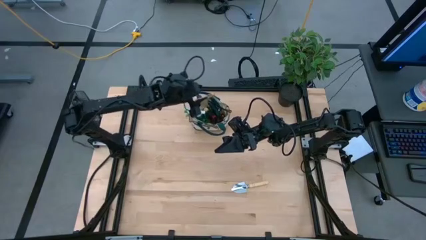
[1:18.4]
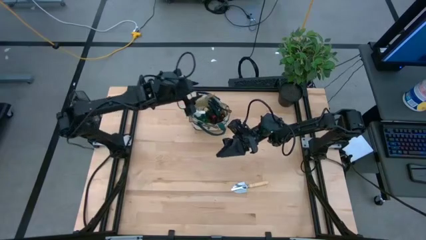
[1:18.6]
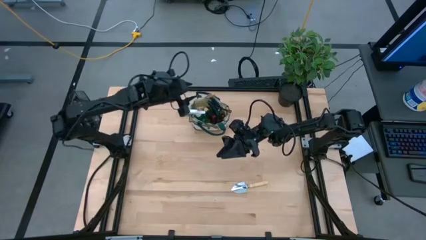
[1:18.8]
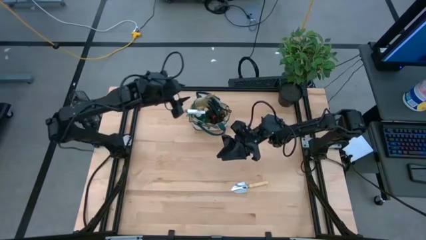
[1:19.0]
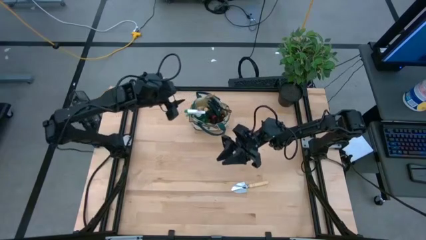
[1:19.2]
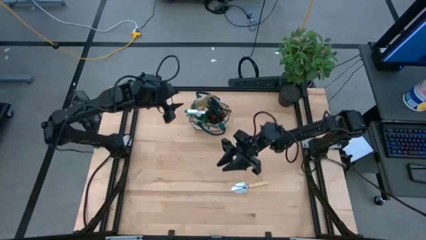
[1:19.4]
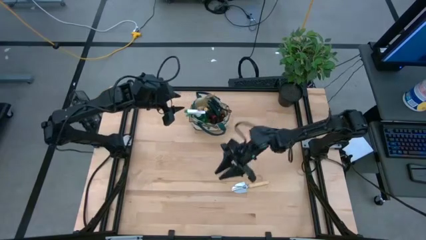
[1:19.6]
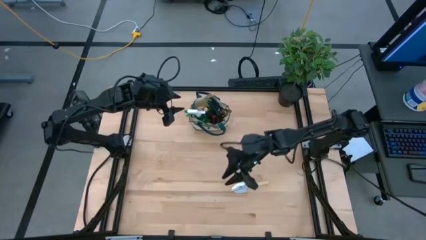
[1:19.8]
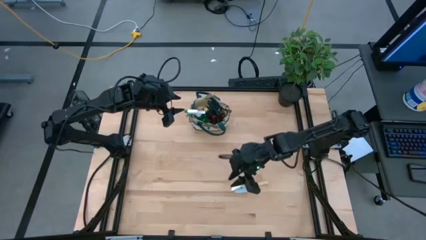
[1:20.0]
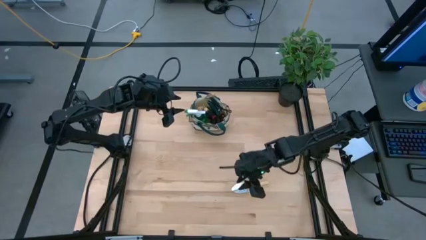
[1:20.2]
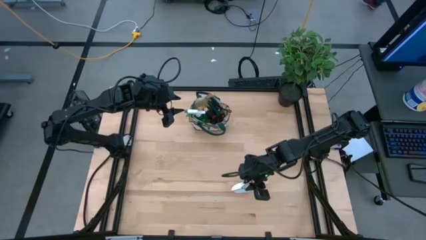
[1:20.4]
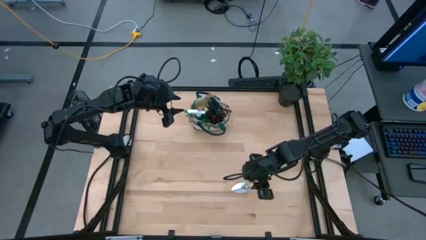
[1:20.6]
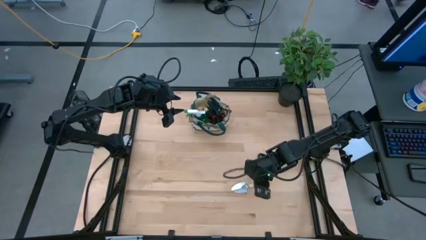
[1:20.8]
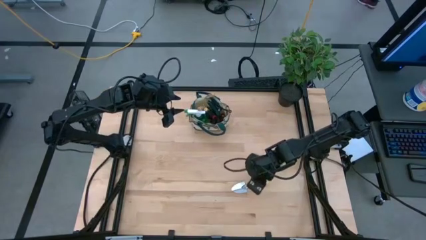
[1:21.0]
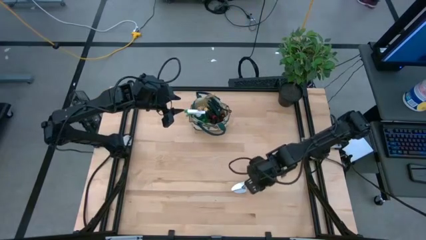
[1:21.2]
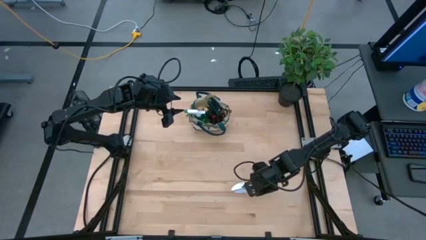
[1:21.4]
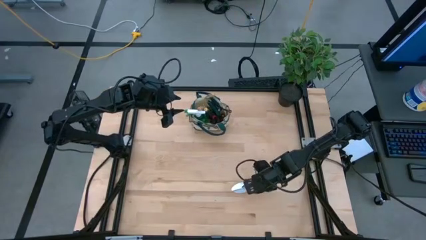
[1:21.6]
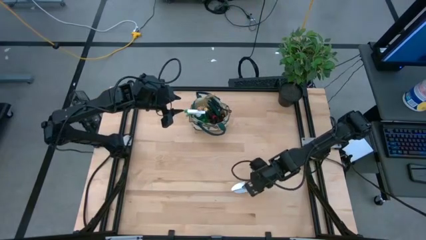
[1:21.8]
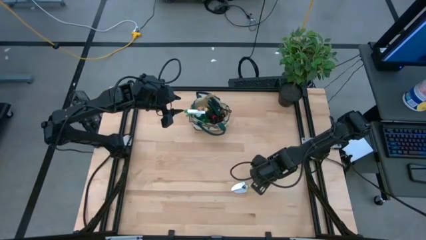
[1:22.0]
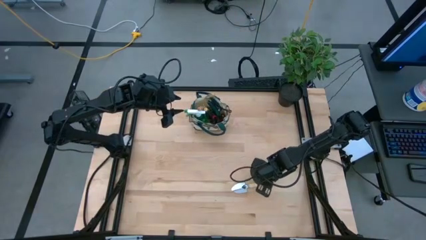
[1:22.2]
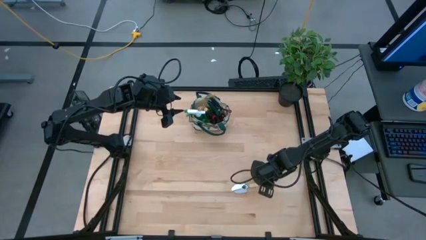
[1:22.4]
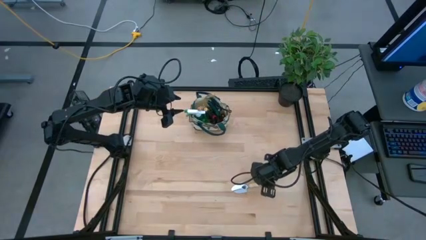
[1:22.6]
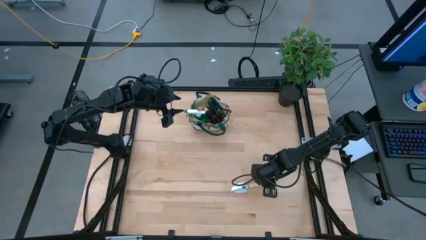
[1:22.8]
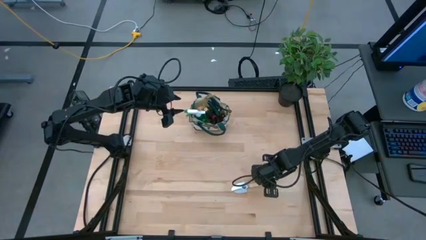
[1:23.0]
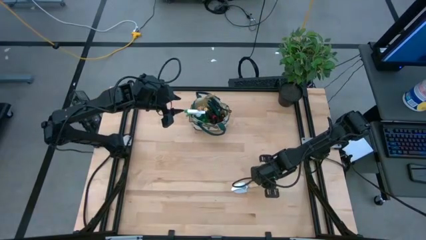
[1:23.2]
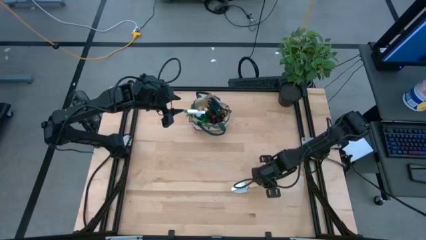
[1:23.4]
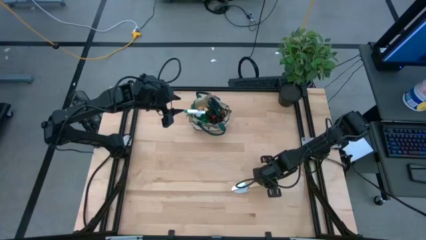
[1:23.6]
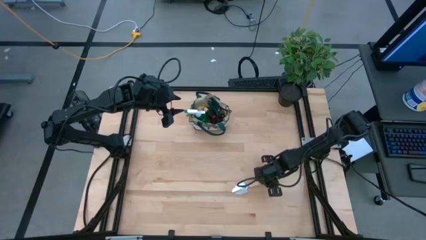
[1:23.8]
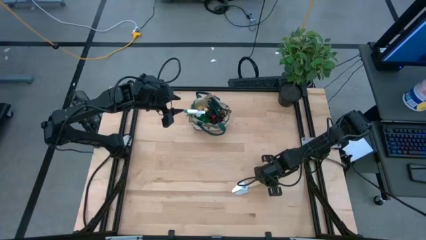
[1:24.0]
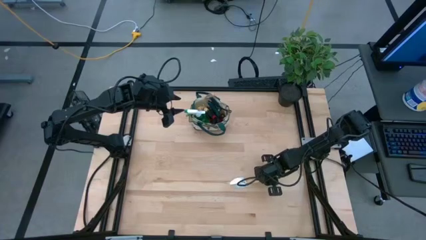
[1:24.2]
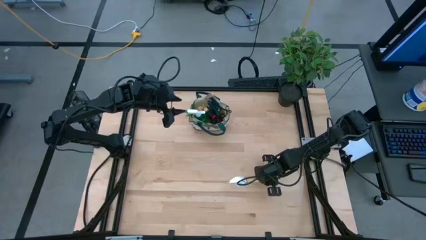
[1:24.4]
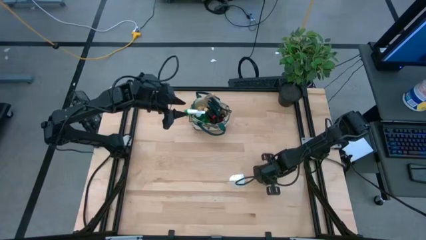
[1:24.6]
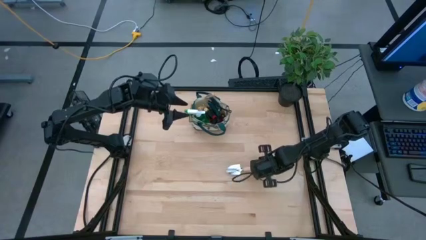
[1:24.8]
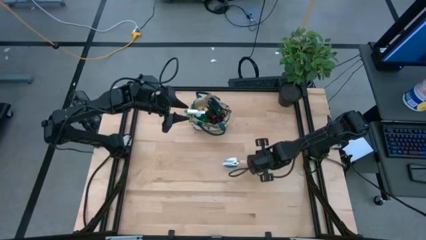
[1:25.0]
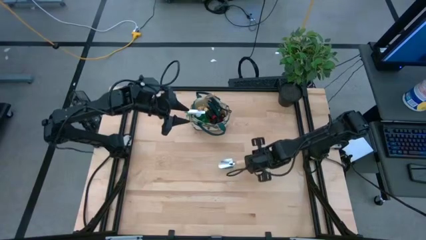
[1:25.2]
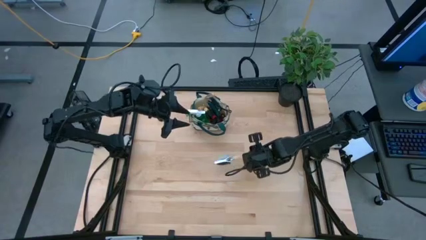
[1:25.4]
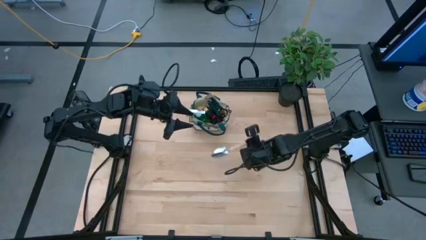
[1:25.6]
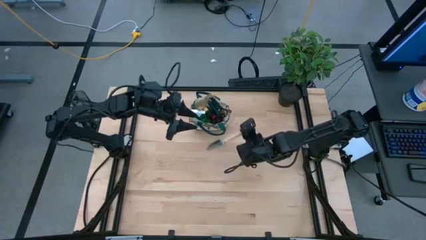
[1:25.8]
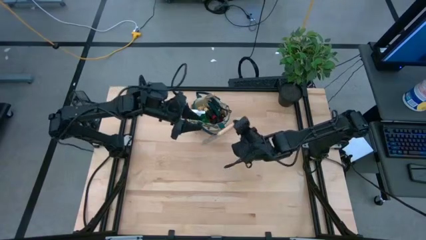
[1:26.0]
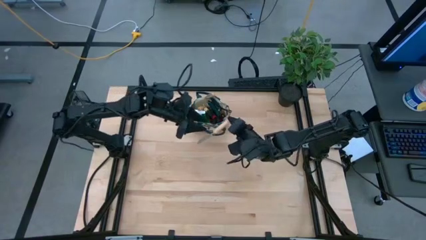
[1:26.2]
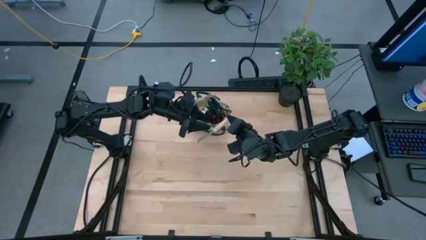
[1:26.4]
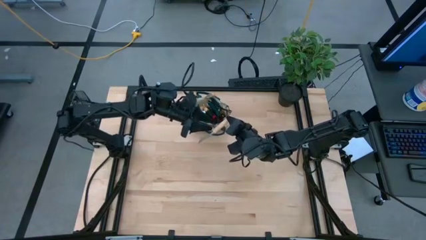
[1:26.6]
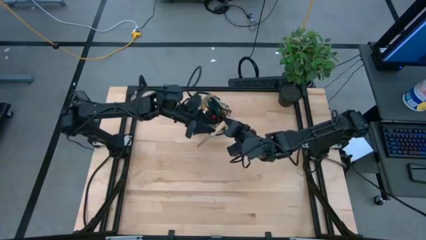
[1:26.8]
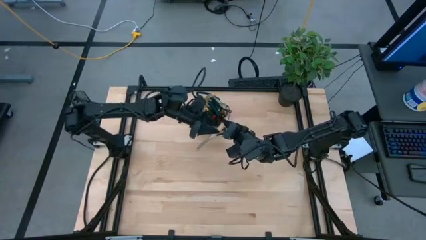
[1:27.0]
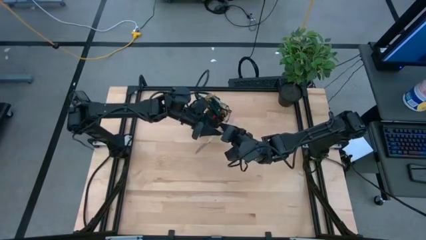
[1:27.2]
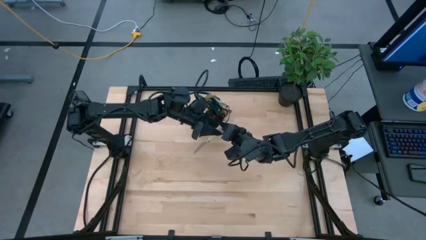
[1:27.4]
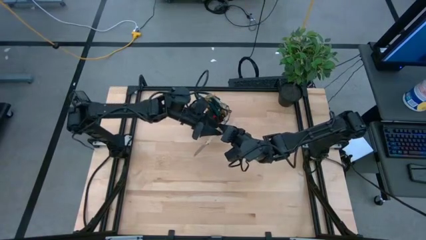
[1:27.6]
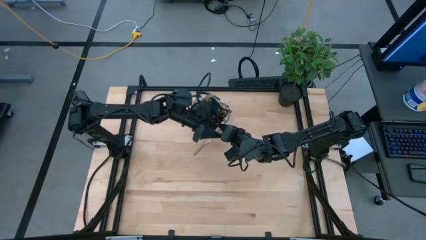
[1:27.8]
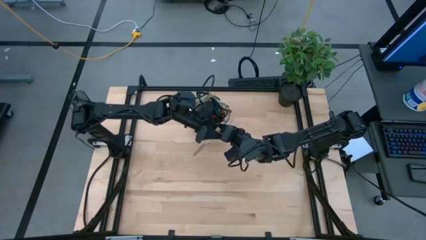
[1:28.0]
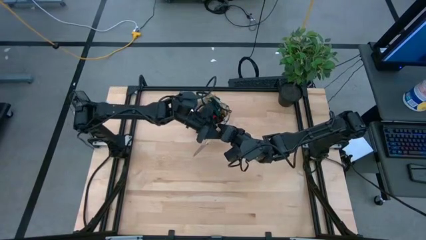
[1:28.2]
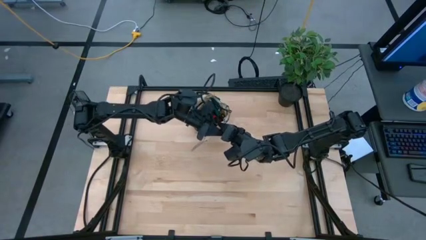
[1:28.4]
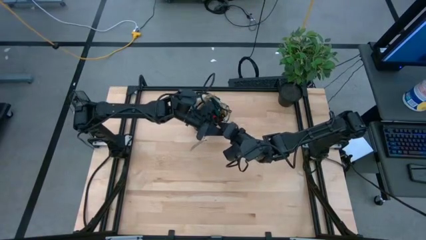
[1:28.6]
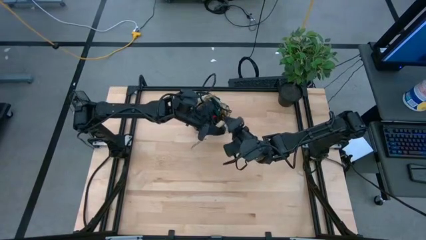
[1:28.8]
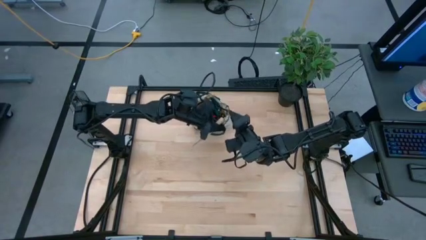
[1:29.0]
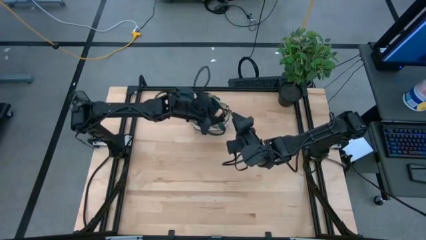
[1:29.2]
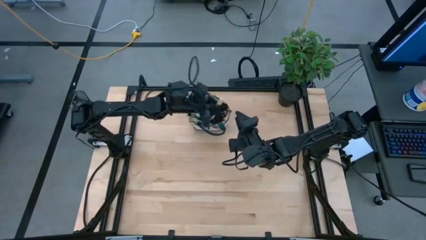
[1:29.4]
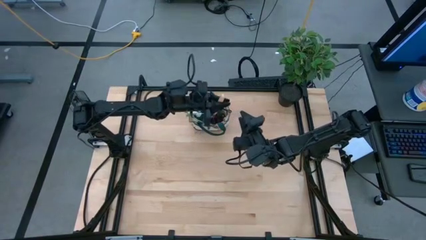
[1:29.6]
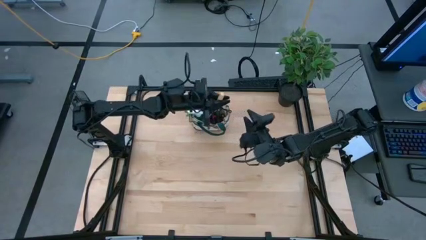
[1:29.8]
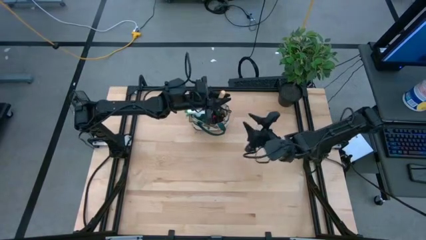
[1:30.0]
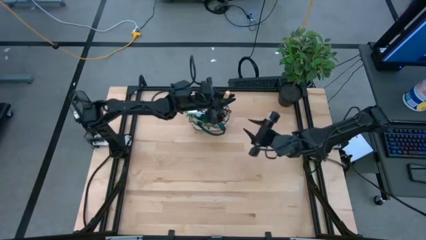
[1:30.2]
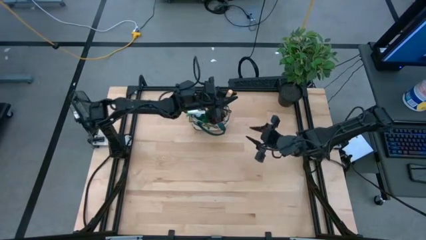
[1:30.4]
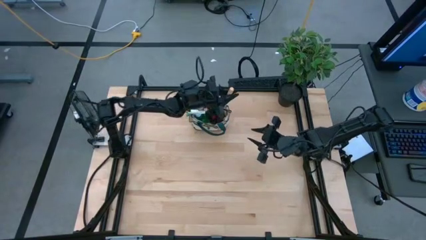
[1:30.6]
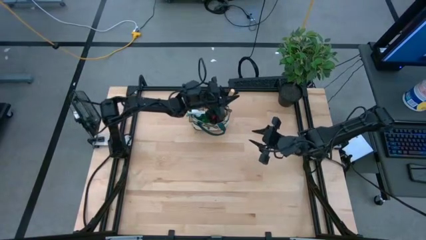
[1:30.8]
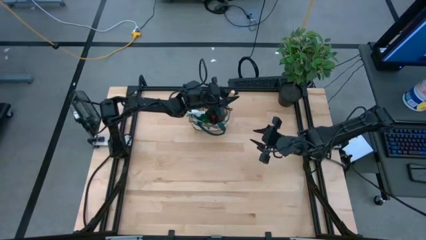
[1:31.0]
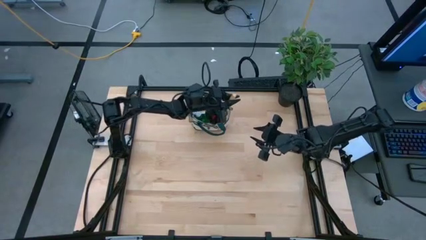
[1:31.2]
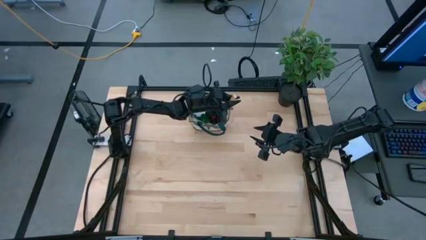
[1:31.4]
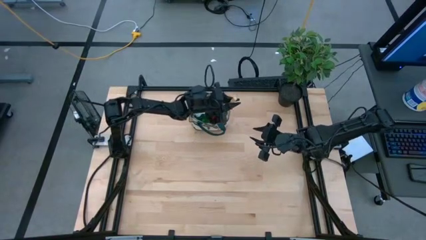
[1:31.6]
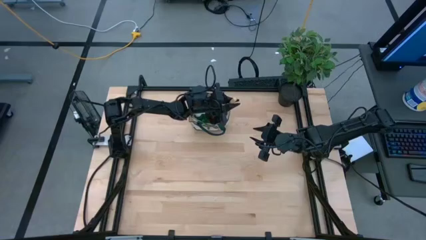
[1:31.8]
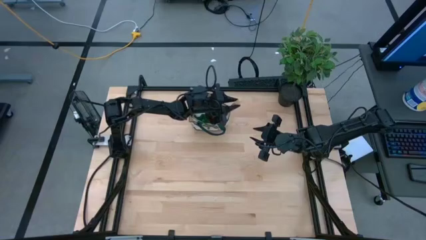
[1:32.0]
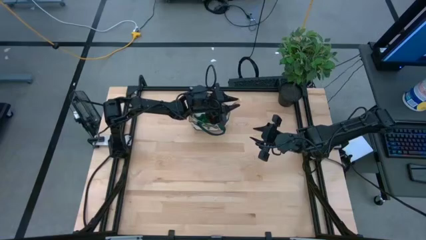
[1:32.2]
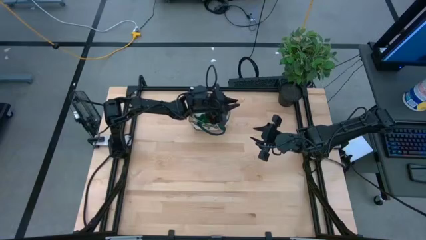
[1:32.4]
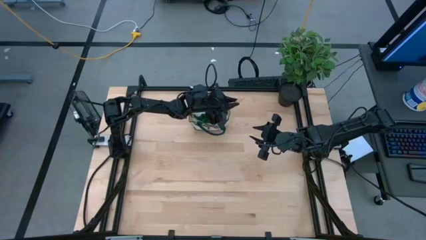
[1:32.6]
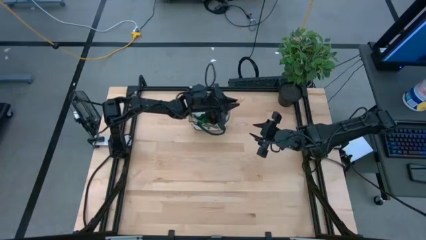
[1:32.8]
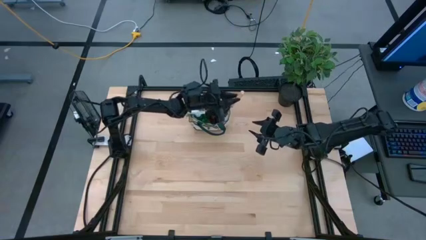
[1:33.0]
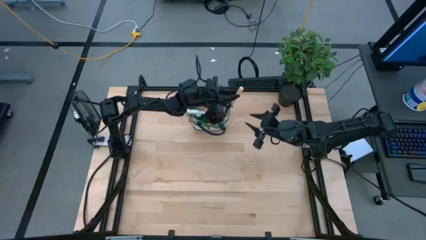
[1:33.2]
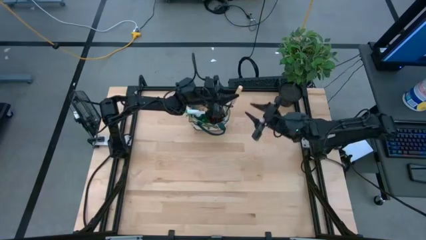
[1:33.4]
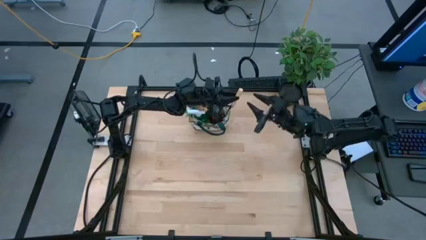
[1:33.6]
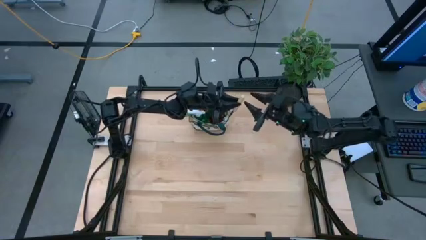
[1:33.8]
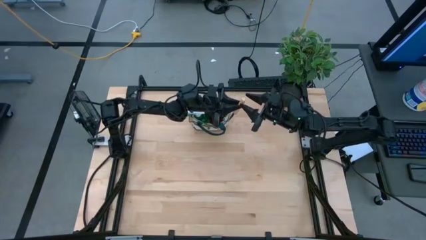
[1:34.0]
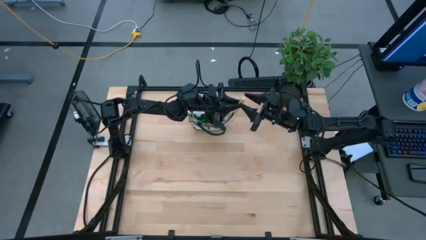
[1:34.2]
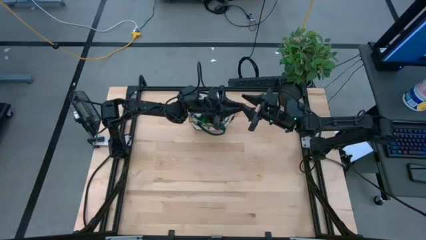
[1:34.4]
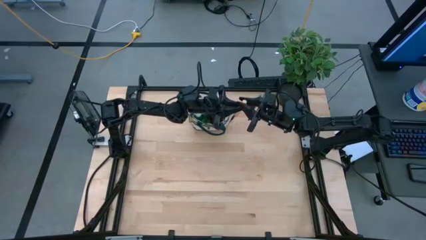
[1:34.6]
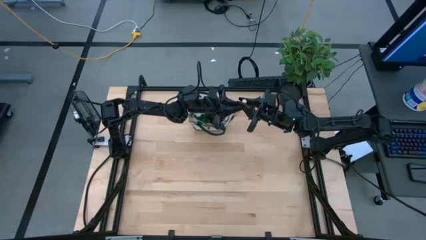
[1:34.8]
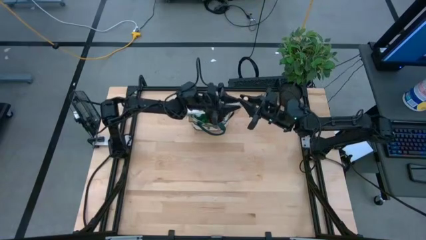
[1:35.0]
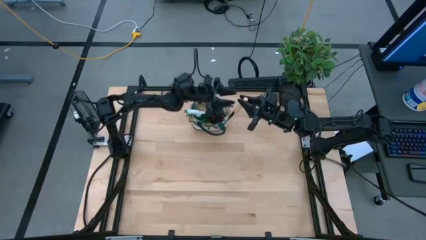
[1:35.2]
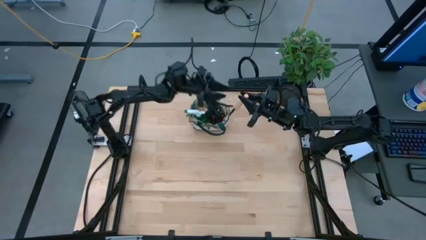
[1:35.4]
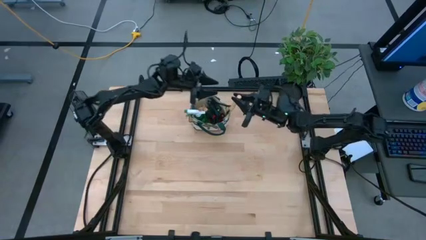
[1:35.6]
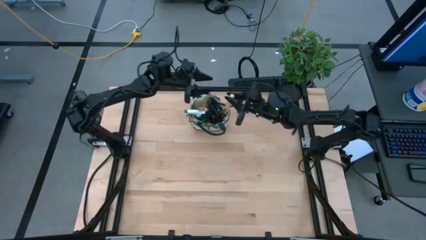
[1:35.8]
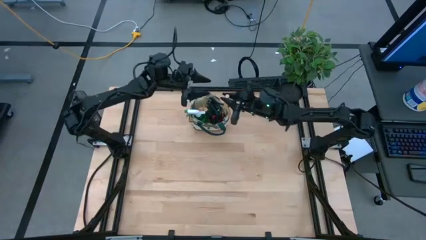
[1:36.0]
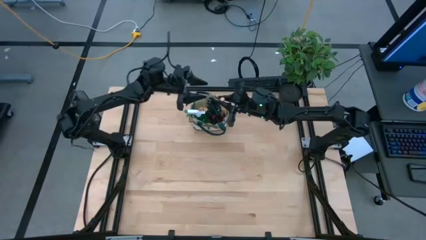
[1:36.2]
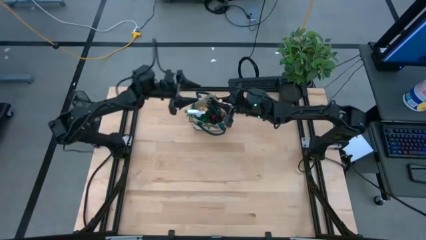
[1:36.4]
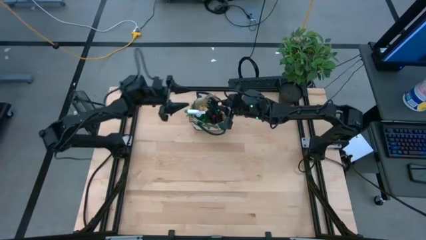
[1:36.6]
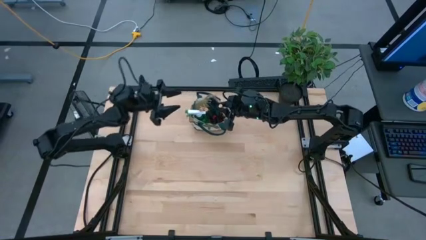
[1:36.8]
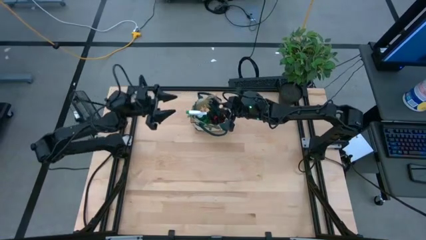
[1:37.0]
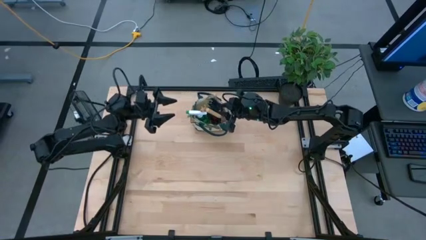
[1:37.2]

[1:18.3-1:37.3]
Task: Pick & Place Garden tools in Gardening bag
Put the brown trowel into the gardening bag
